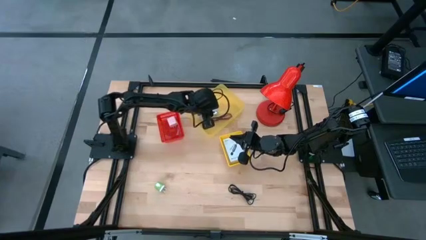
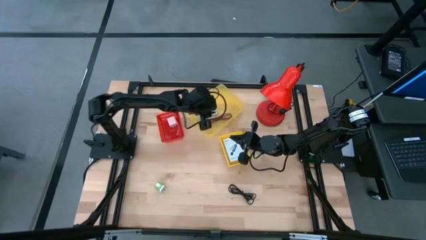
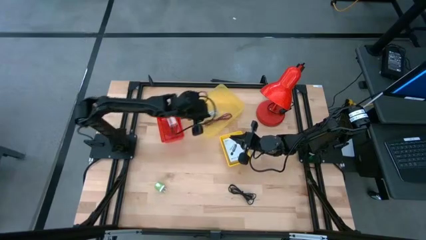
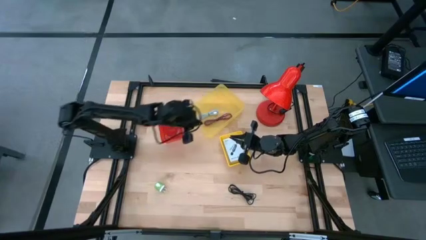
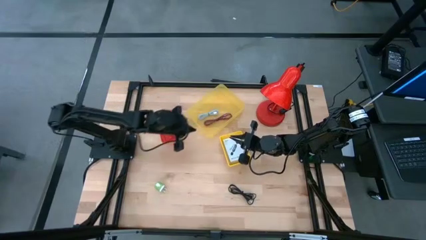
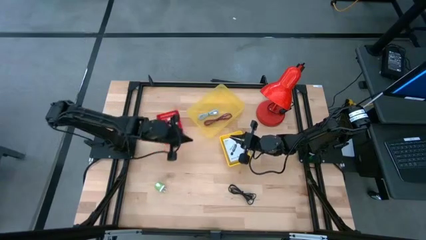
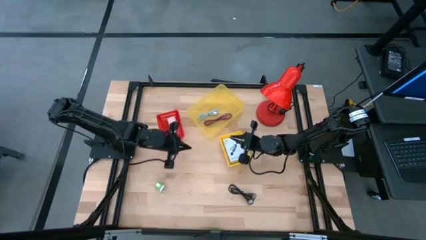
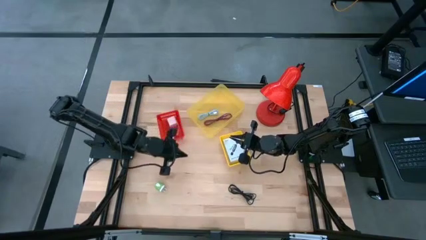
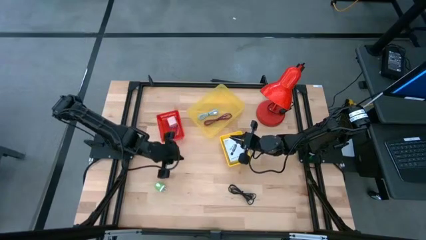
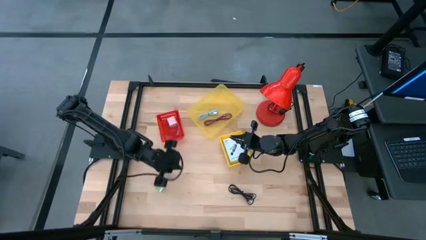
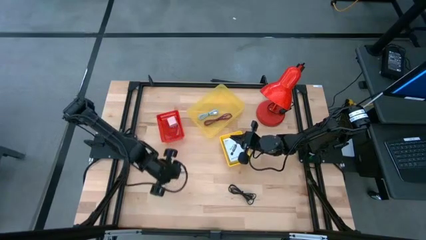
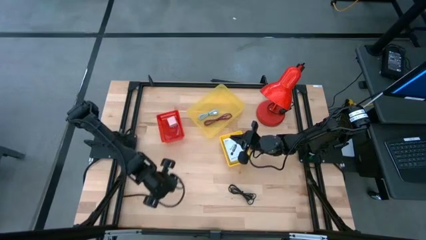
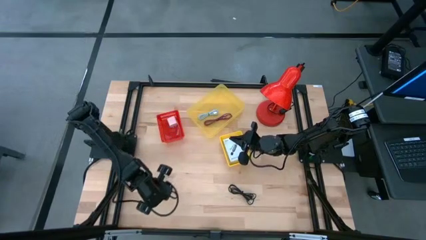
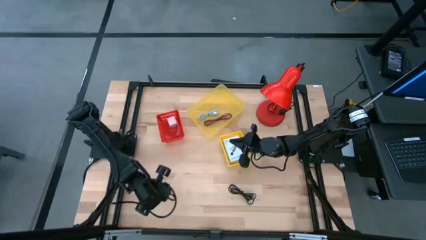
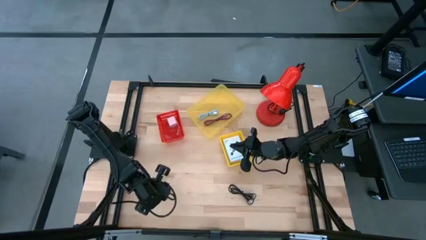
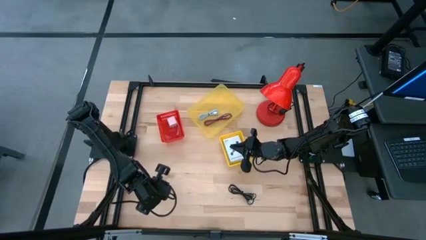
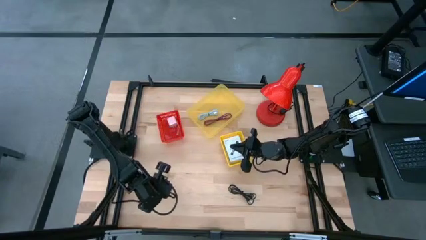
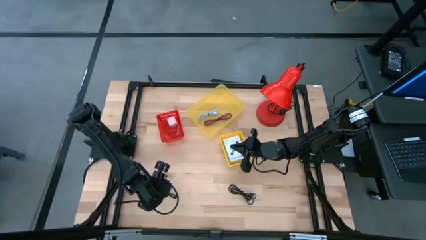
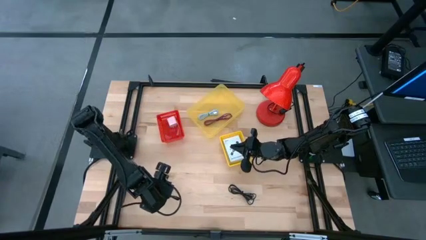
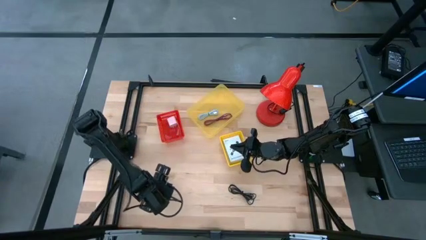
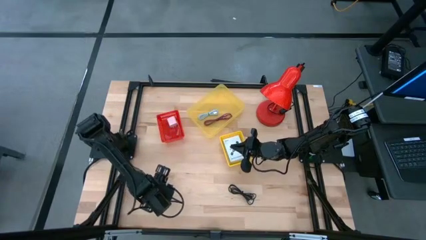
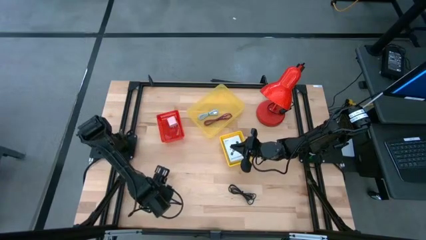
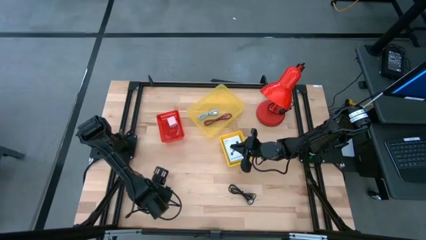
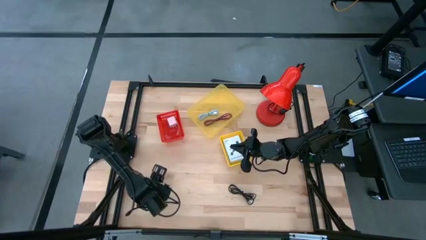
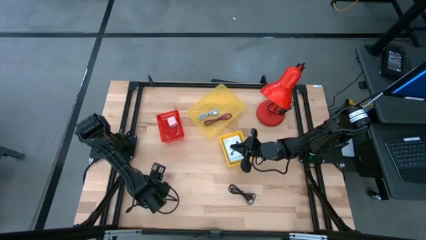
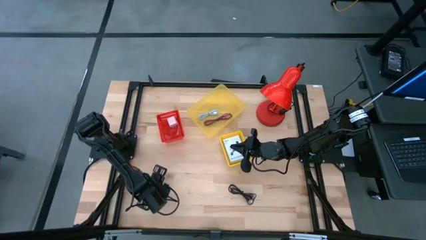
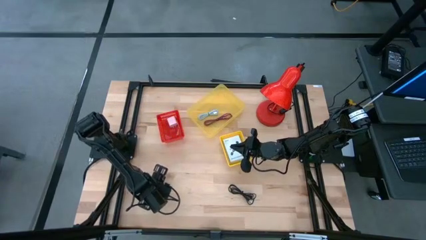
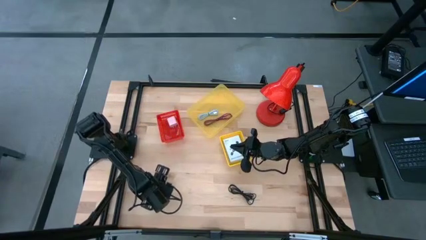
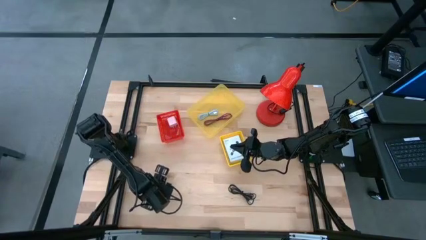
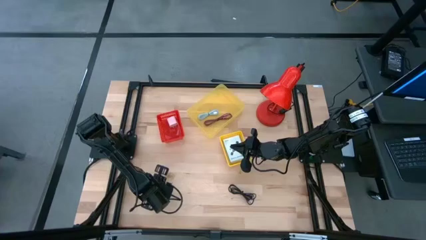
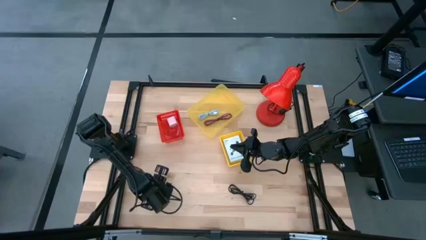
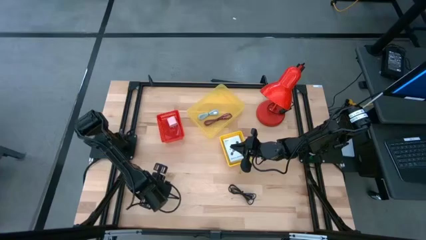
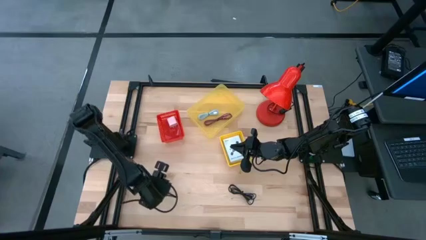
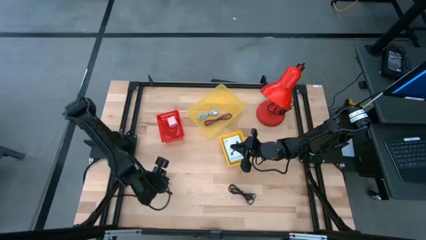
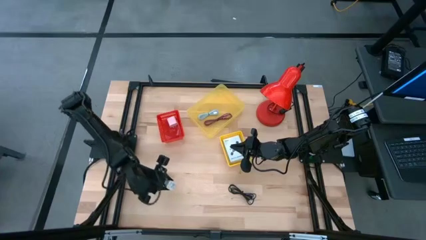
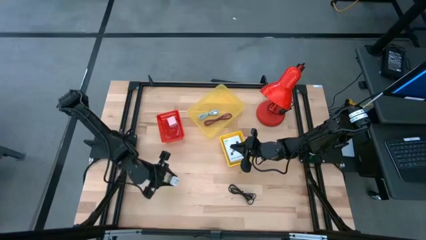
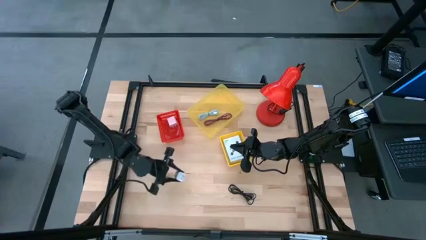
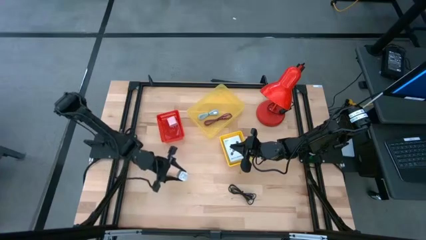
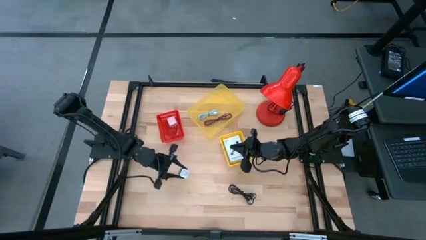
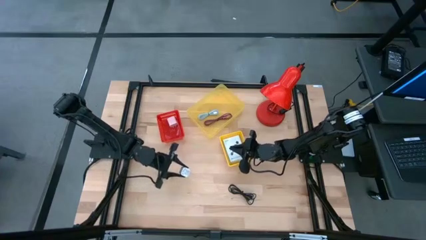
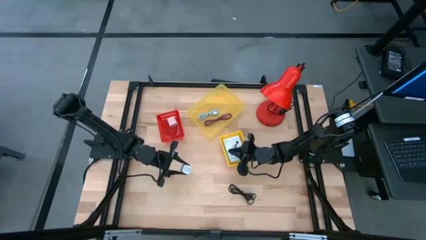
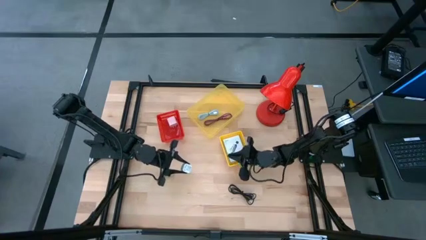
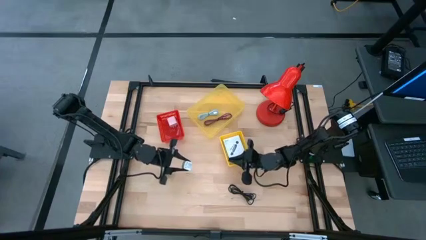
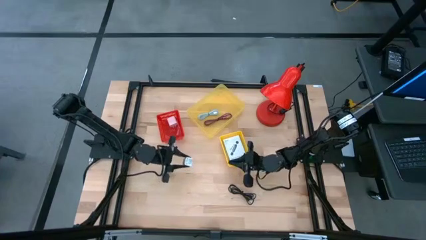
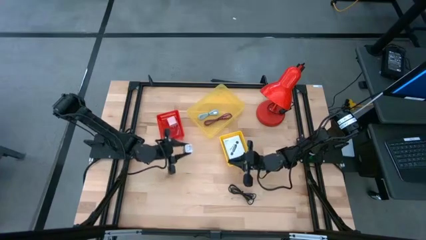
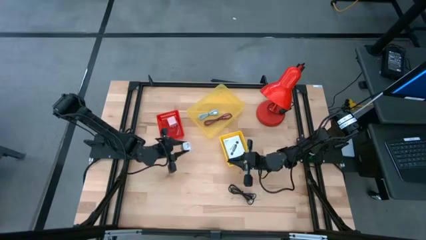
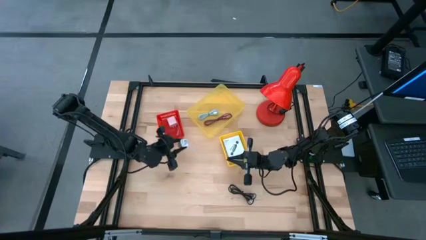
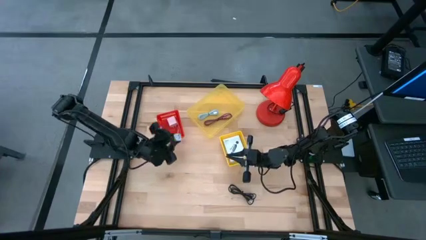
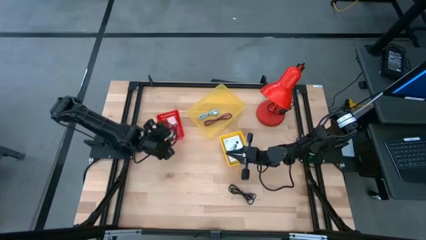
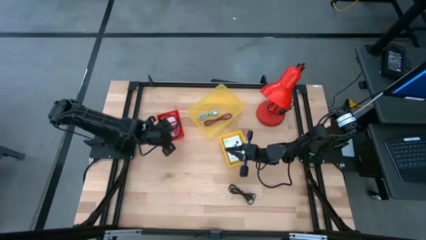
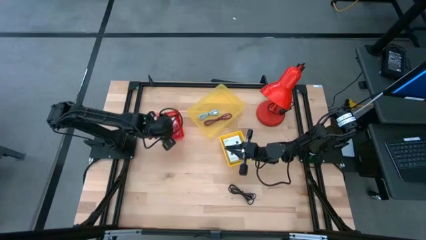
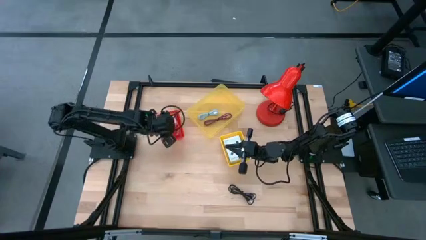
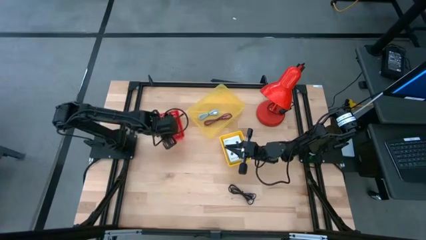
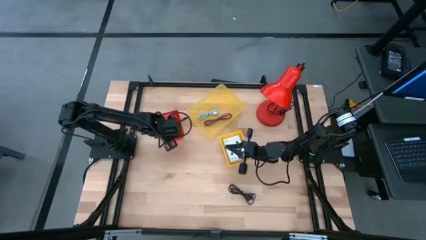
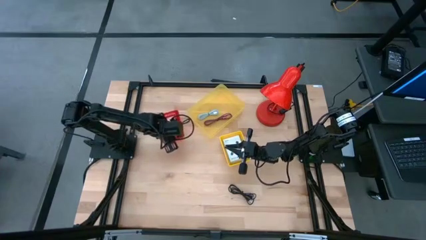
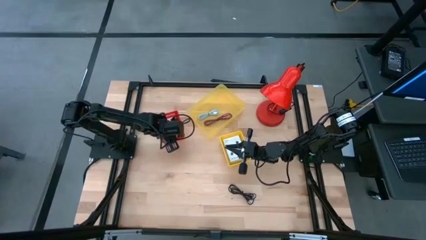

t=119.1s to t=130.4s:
Task: Pick and place items into bin
Put the green charger adapter into the red bin

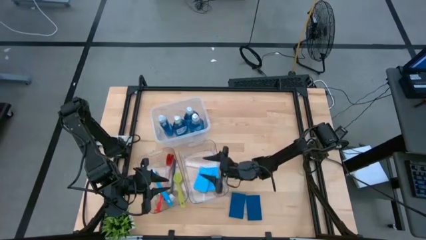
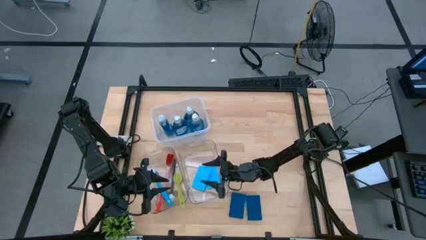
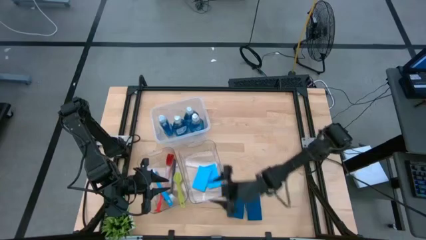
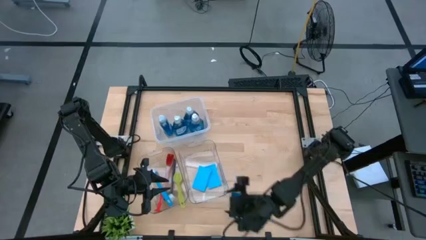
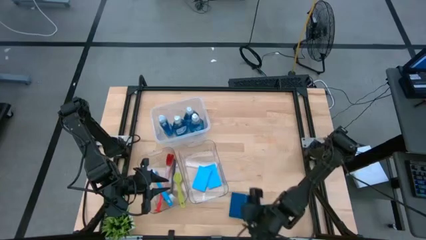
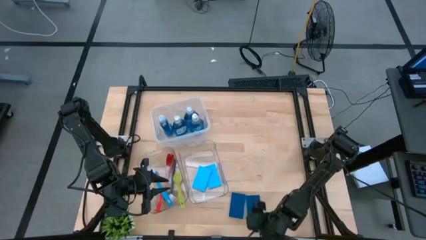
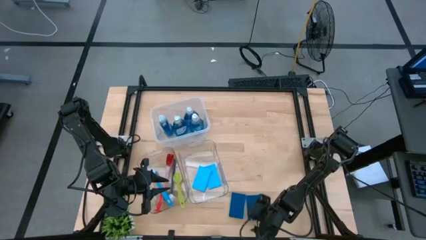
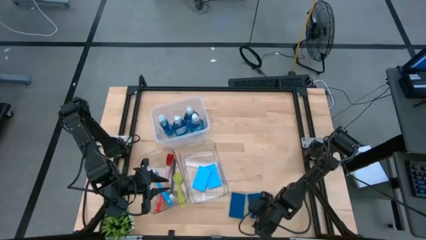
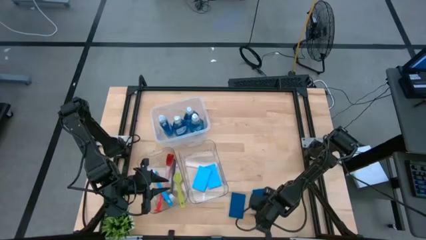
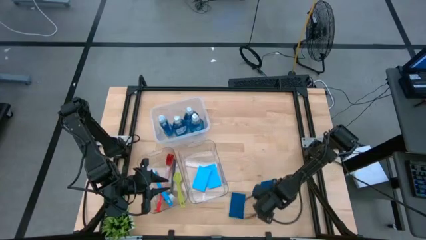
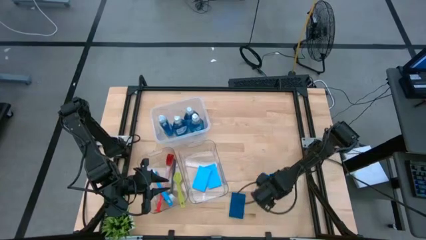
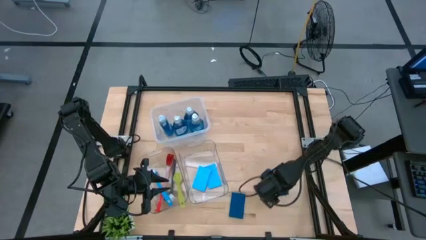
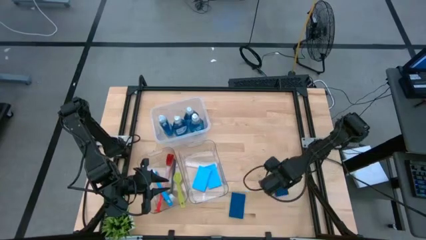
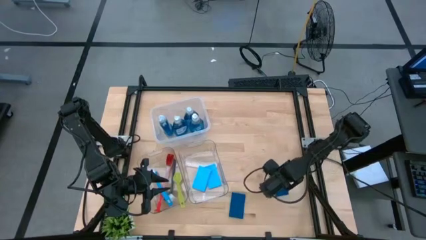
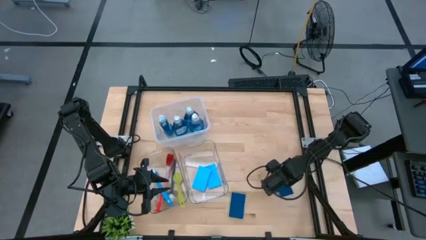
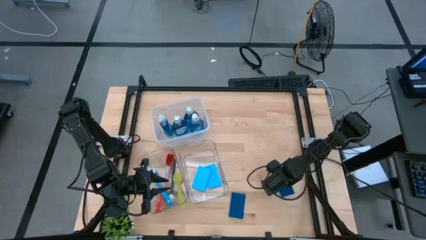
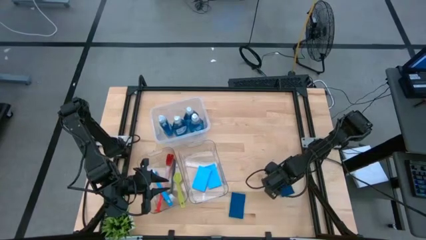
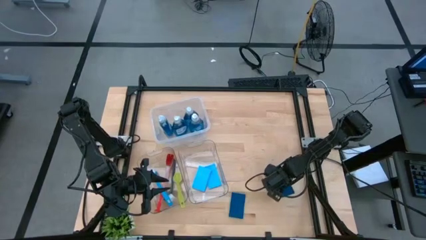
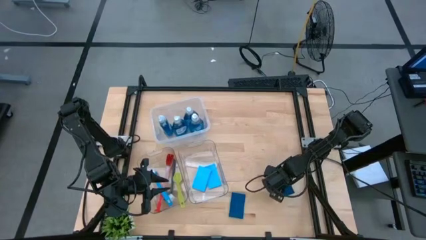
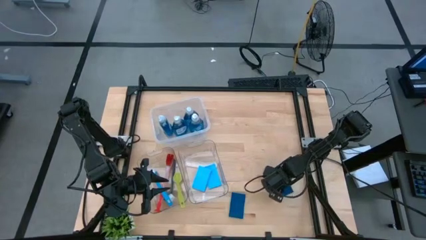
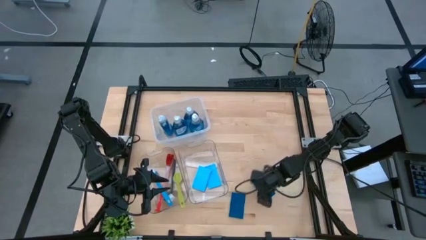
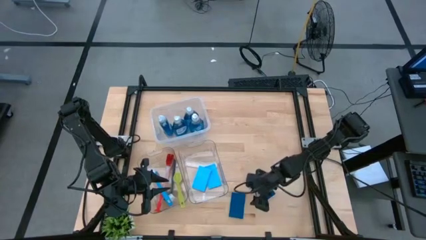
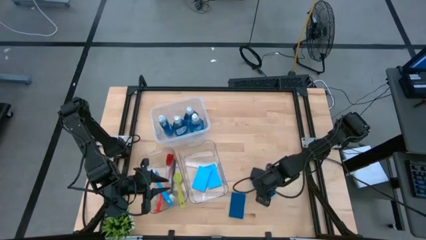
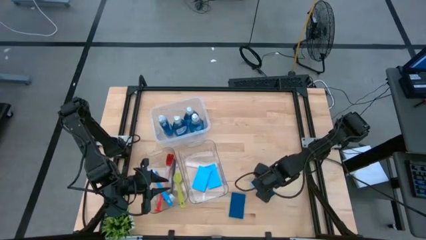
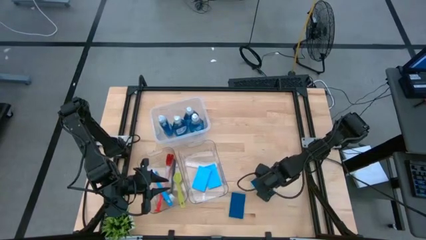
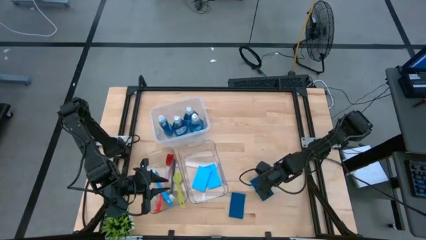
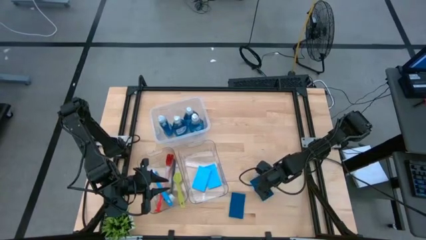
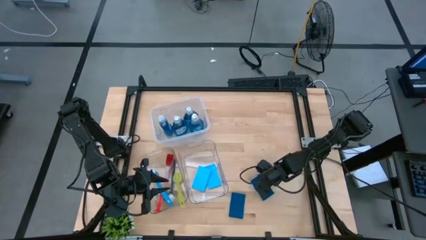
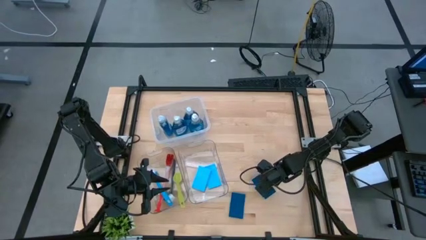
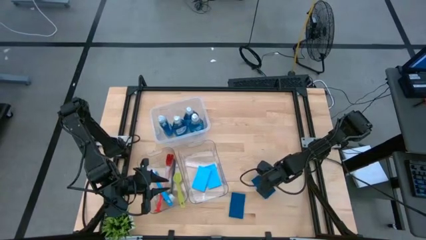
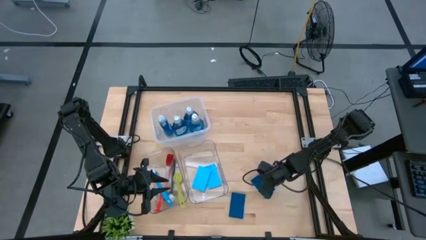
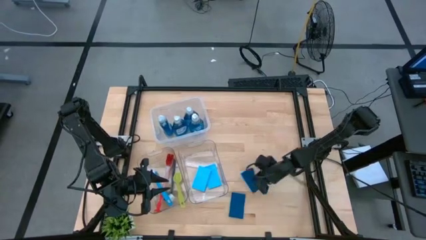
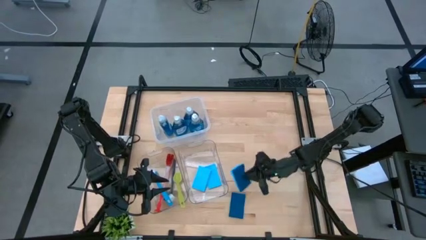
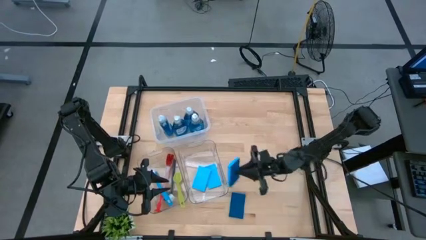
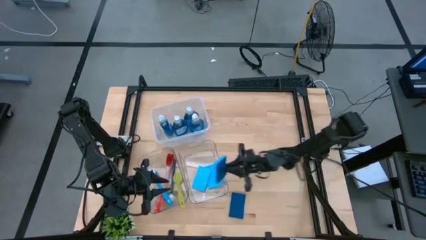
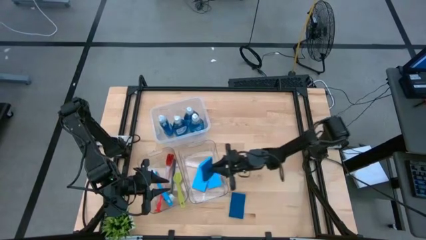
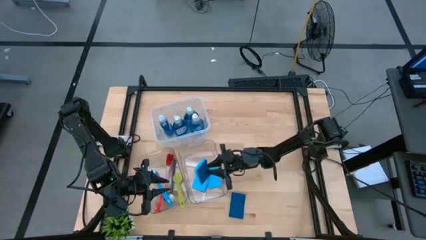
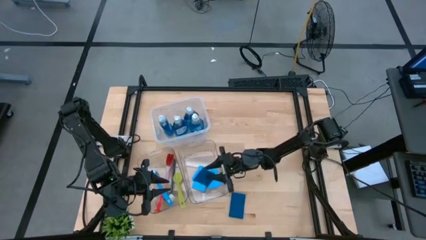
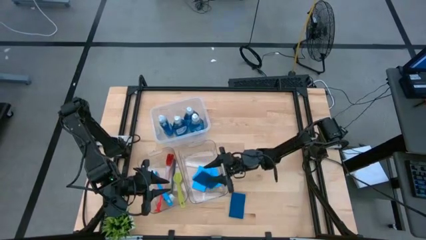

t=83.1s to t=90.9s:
Task: Pick & Place Kitchen Sink Supplies
Put the blue sponge wipe into the right transparent bin
